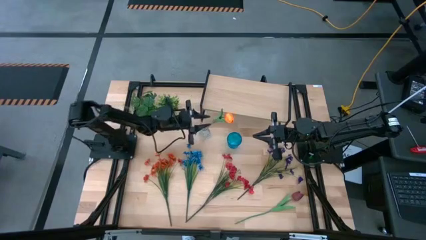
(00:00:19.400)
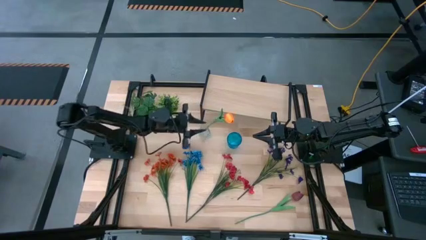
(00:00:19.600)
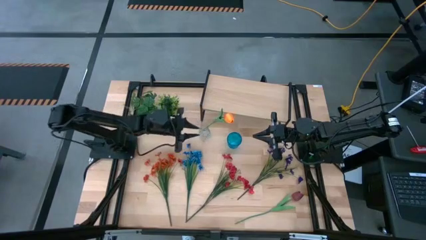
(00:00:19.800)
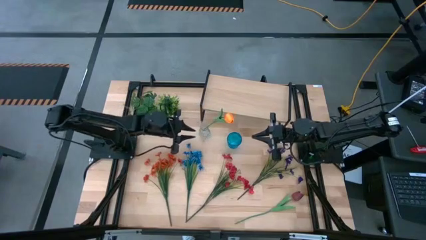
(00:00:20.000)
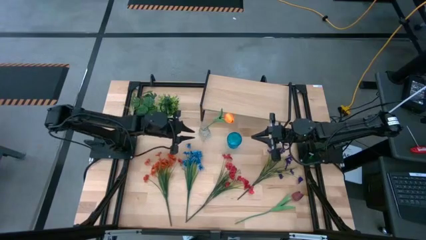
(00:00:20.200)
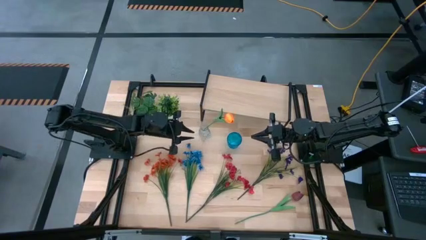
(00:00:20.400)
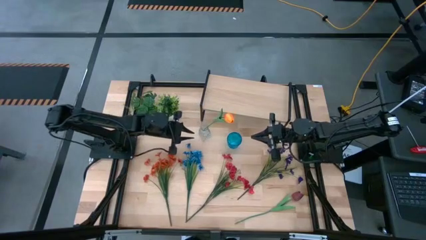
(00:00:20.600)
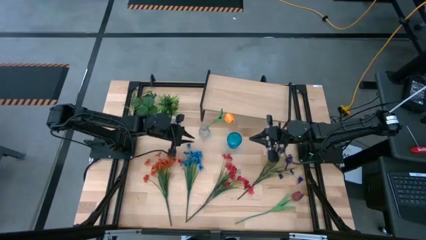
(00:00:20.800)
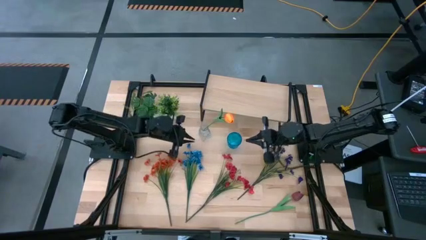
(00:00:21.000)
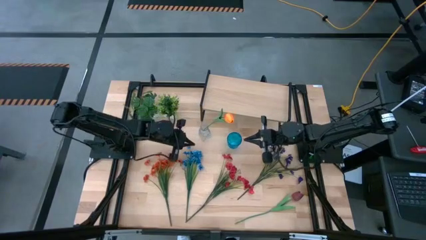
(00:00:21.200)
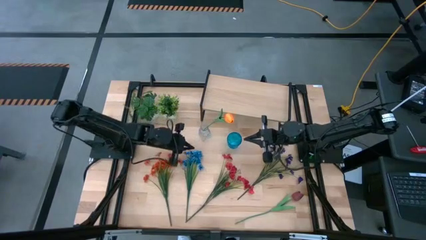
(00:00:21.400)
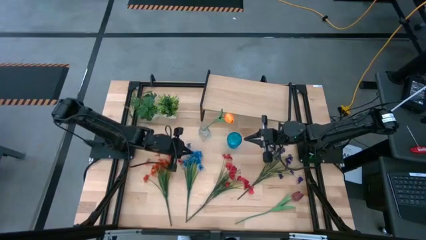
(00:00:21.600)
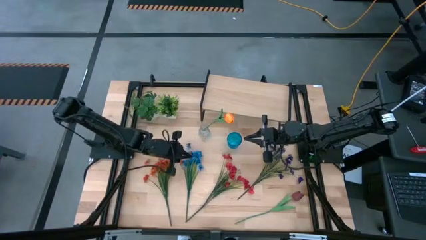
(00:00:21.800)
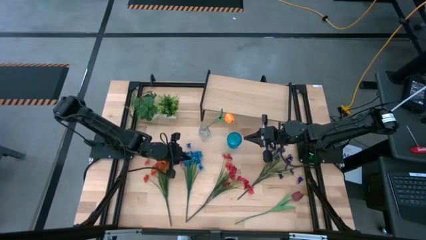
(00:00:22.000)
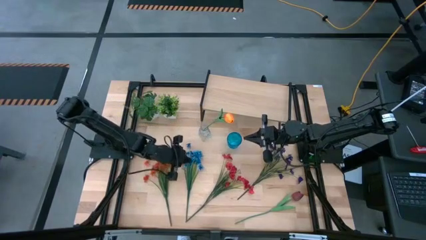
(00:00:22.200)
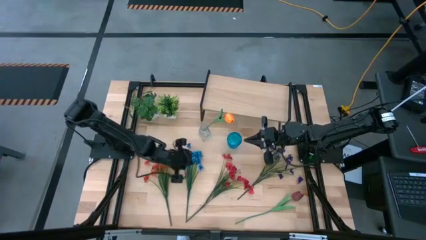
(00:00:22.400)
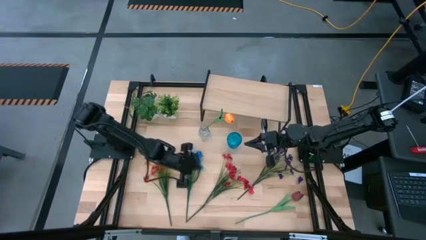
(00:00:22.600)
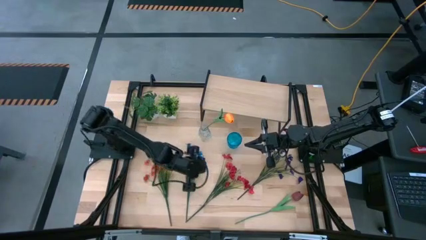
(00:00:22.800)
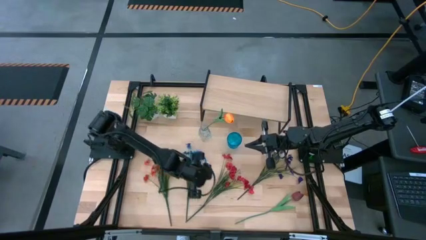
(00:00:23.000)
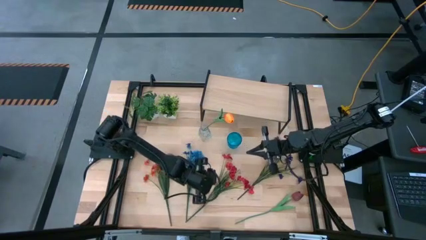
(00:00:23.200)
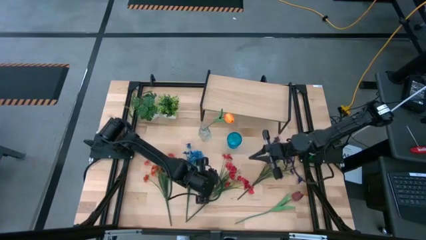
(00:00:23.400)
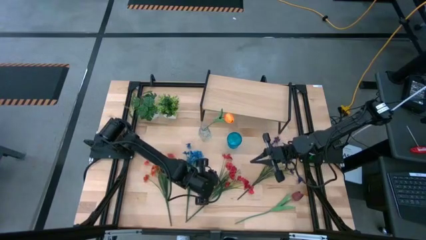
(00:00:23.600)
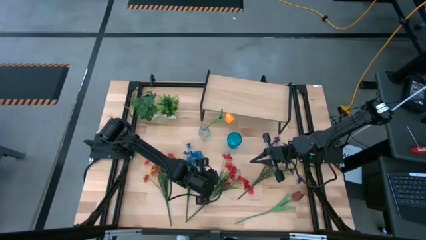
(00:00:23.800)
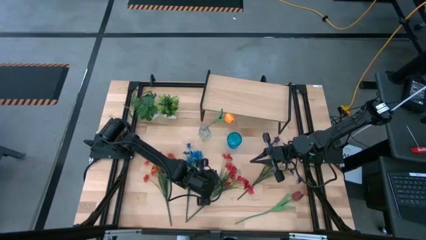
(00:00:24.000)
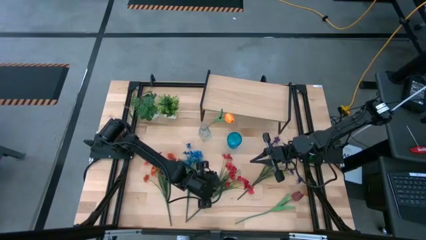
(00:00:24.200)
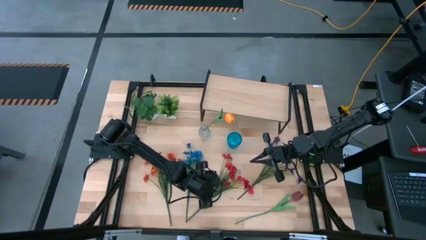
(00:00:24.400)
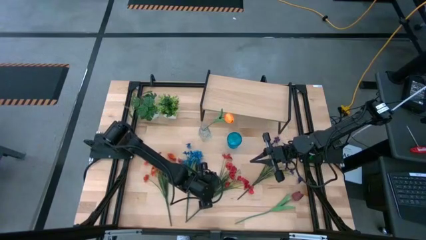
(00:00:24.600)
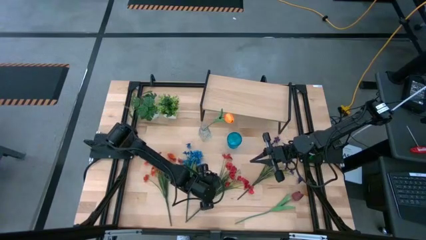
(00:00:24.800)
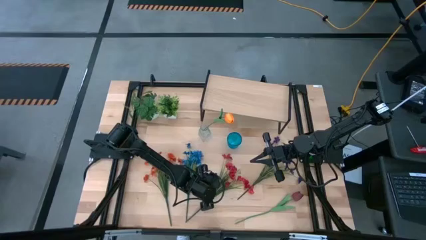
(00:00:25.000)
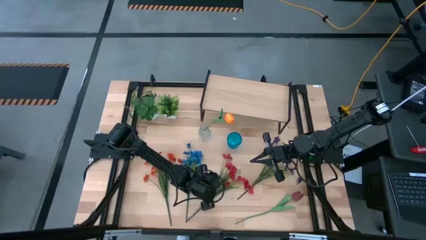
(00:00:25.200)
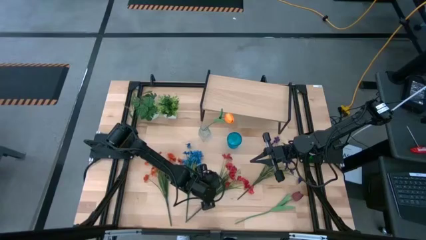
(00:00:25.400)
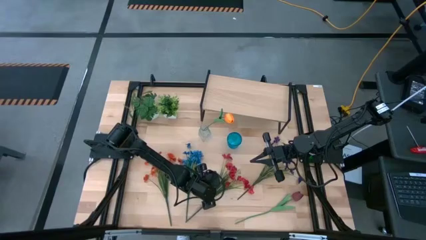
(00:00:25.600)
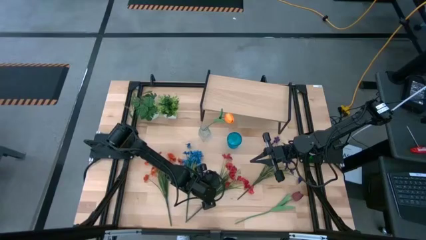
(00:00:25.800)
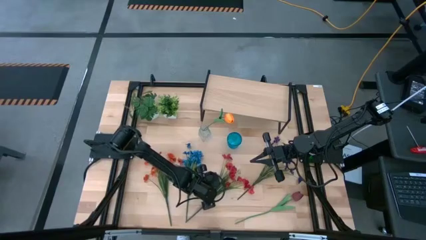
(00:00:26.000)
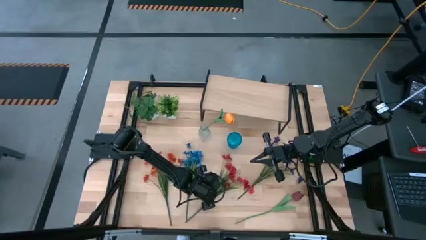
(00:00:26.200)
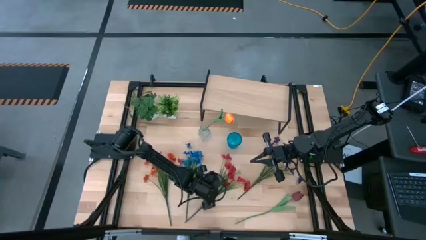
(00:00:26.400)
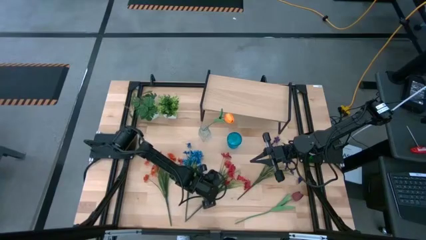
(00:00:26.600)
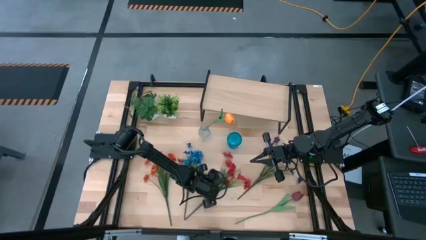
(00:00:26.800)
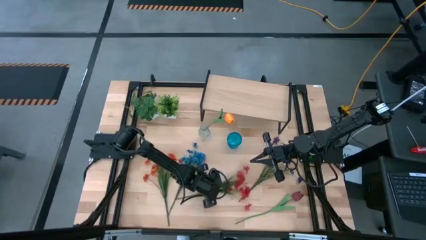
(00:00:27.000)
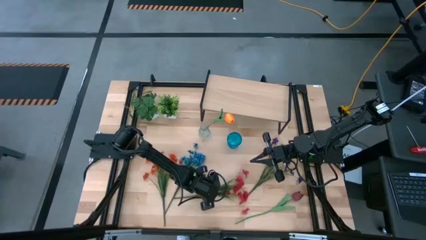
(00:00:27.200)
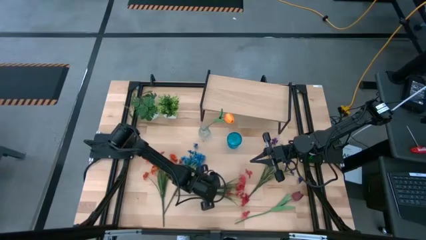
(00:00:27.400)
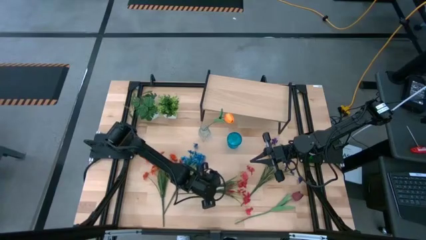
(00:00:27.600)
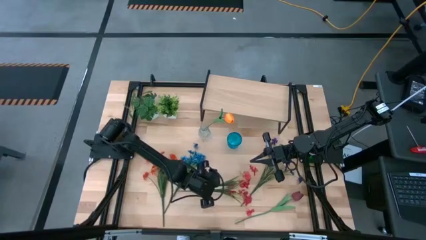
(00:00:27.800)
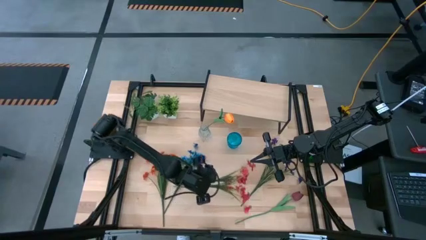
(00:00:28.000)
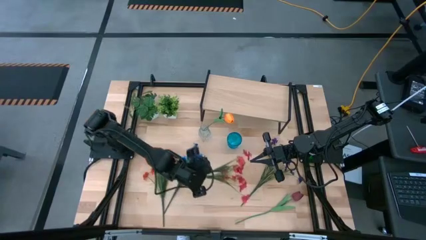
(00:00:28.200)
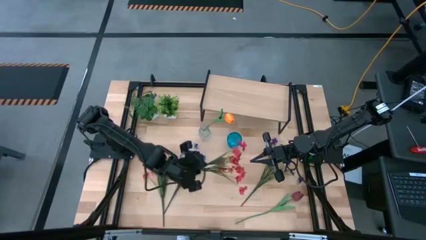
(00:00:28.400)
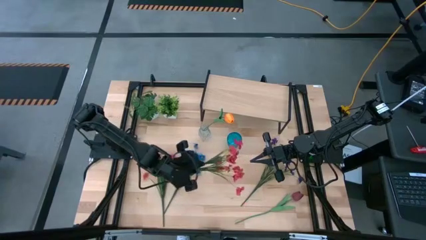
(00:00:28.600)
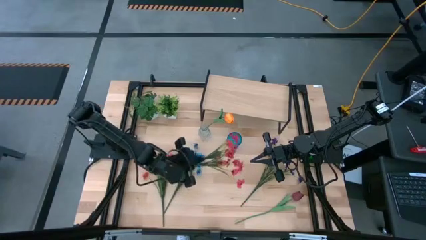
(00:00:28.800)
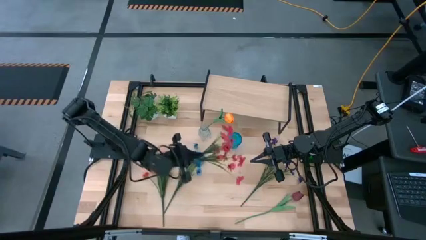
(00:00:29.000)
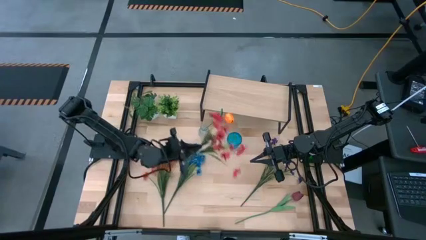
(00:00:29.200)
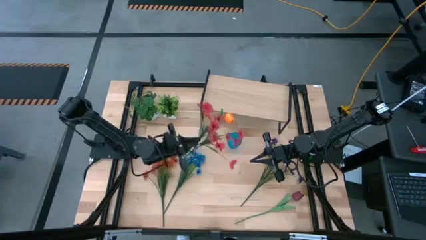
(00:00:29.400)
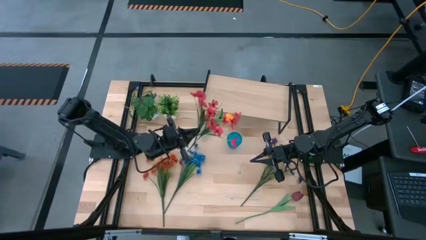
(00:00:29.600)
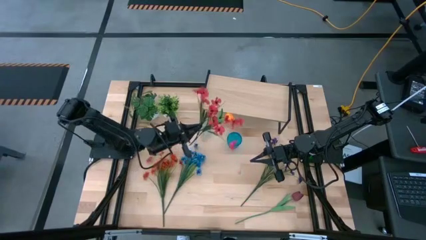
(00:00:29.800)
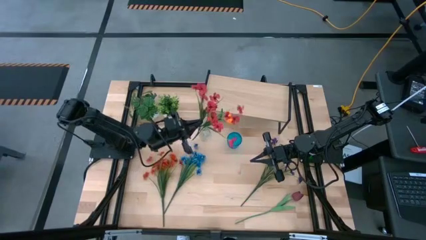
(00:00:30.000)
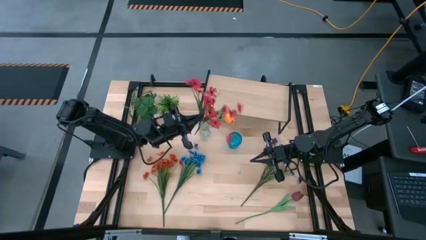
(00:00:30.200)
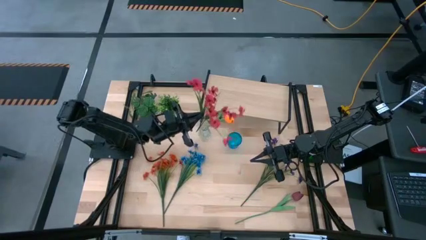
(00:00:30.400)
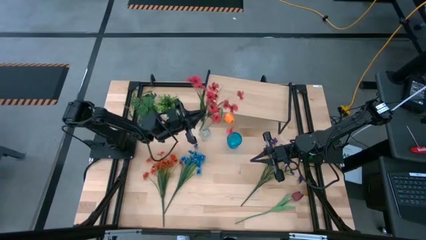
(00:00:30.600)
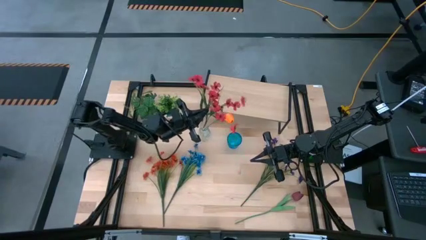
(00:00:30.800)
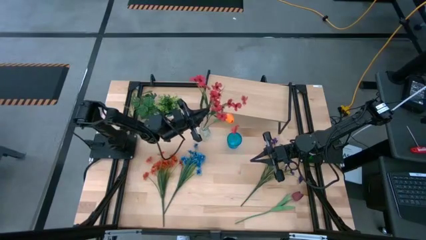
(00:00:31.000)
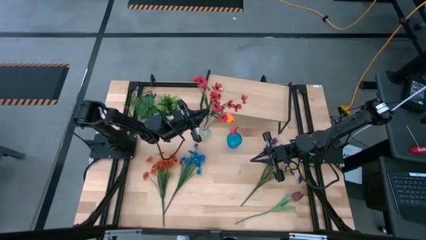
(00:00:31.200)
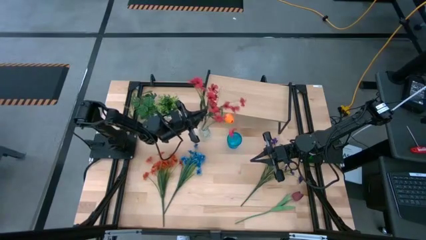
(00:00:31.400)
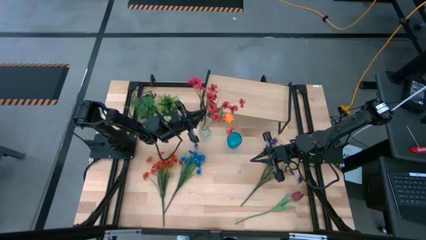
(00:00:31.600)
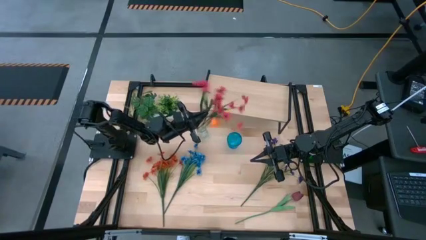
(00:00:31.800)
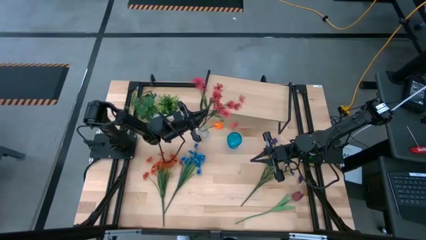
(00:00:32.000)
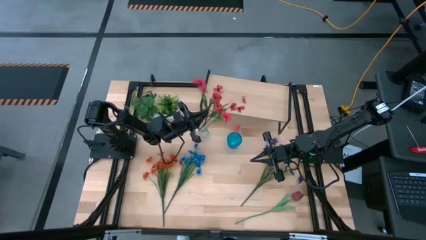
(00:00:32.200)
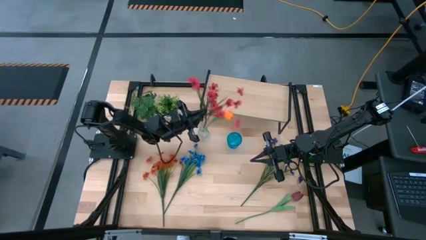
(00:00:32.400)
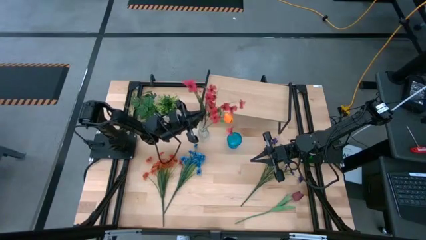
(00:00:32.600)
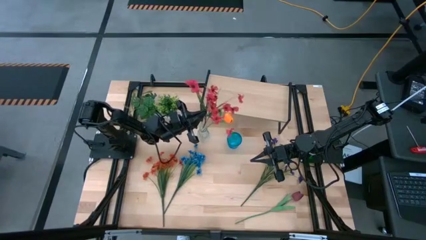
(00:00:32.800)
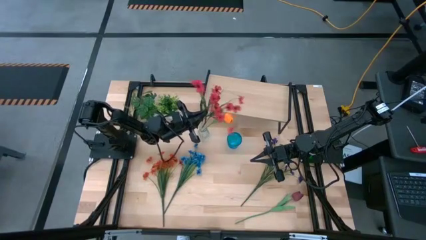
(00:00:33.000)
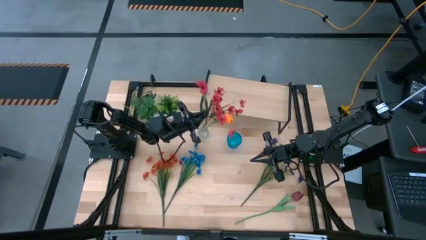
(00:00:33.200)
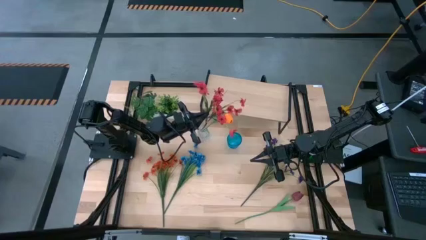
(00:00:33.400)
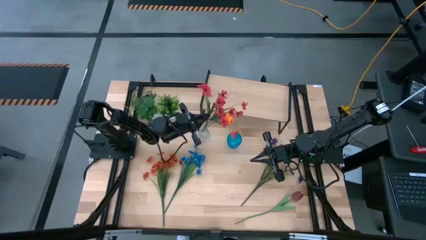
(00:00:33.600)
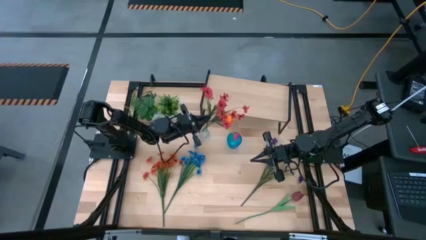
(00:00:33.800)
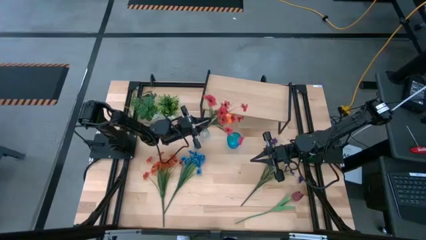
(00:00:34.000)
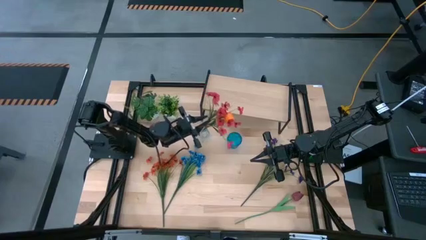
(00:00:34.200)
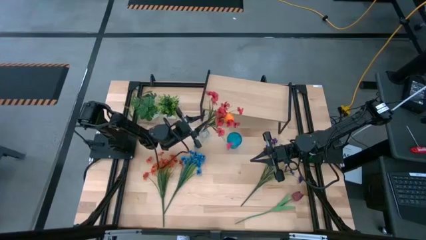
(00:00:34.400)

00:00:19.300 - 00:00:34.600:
Task: Pick and place flowers into a vace then onto a shelf
Put the red flowers into the transparent vase
